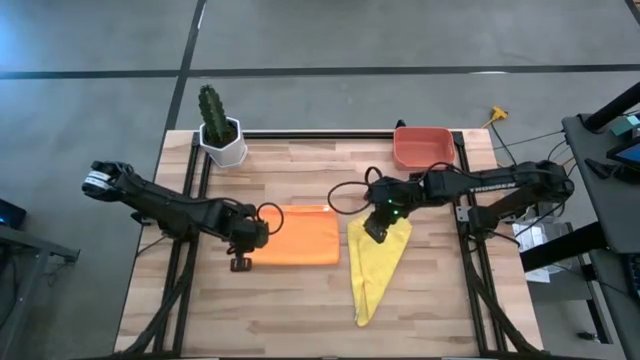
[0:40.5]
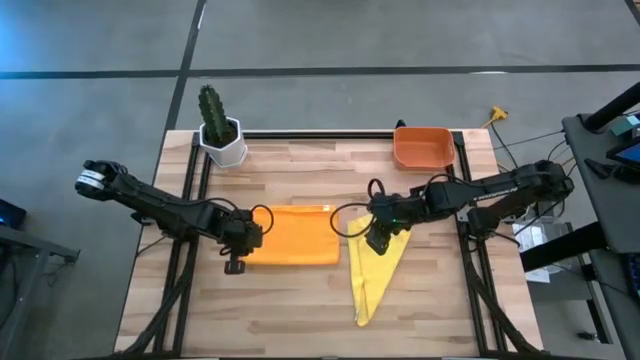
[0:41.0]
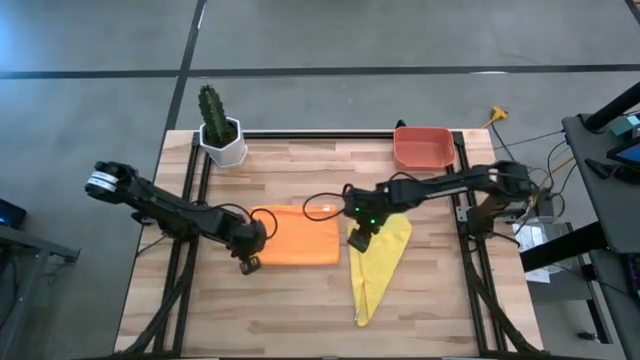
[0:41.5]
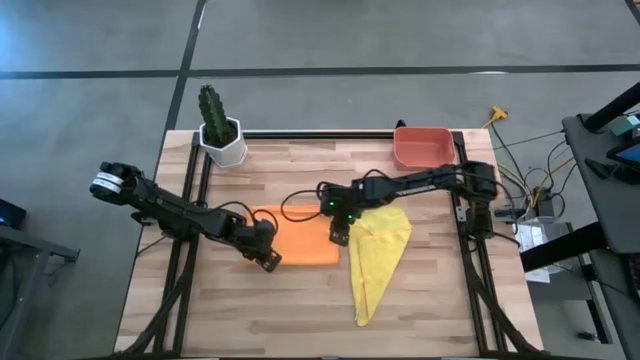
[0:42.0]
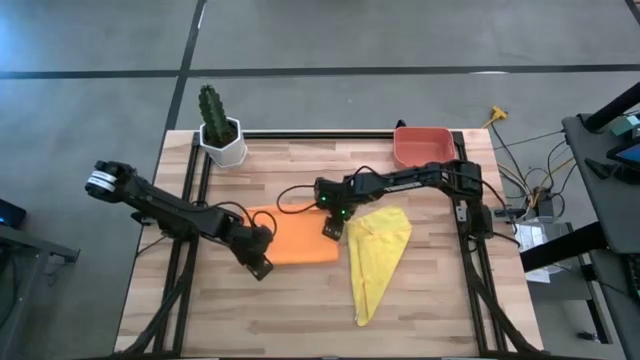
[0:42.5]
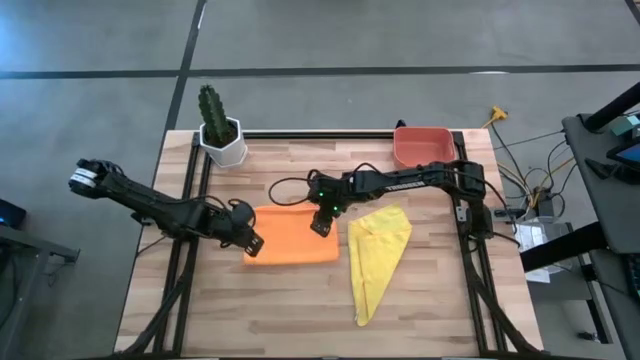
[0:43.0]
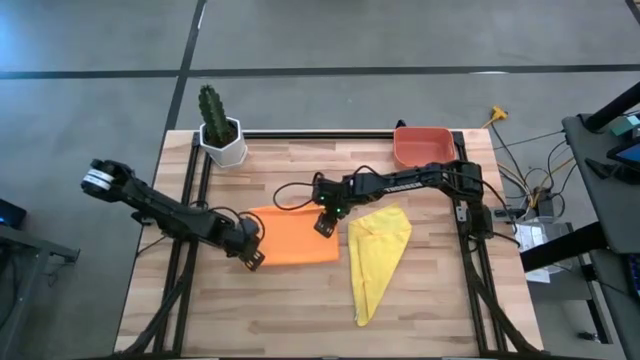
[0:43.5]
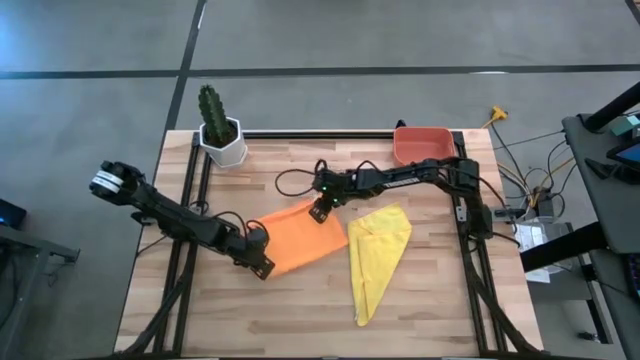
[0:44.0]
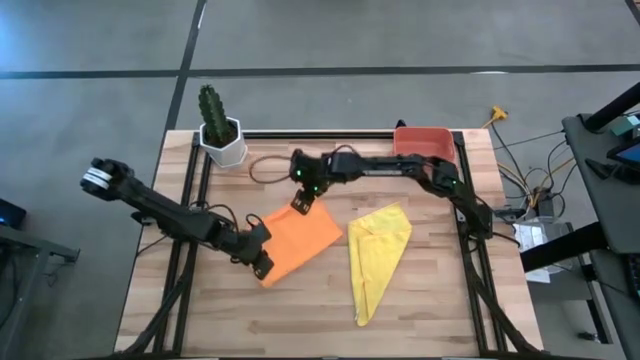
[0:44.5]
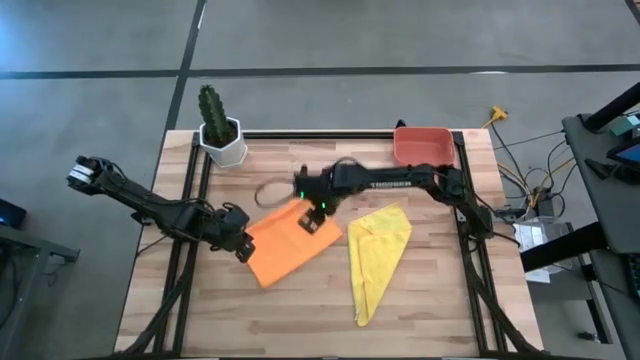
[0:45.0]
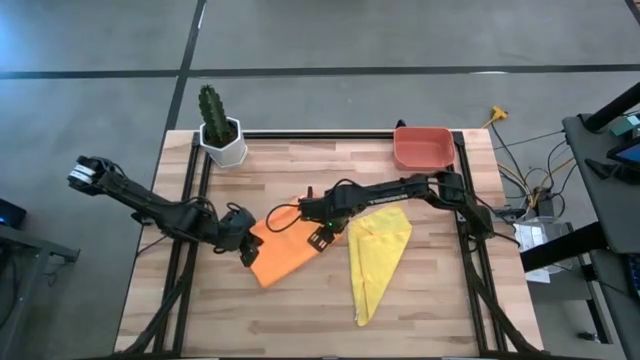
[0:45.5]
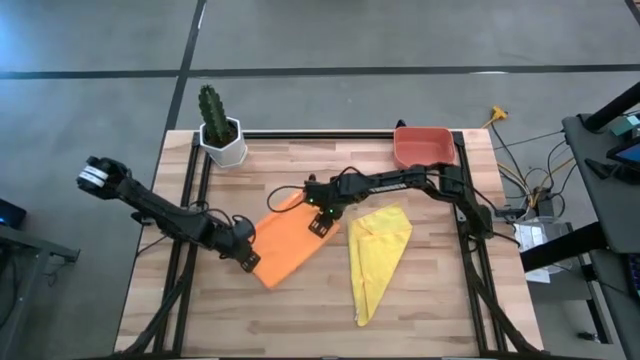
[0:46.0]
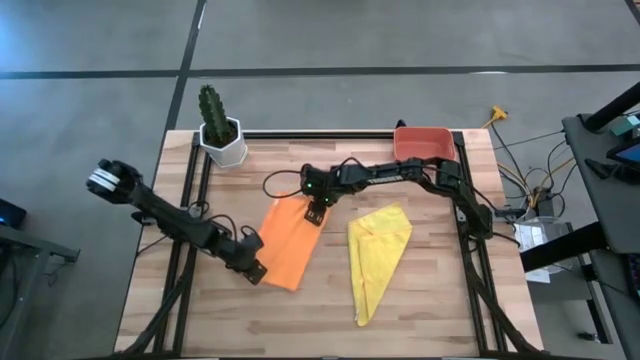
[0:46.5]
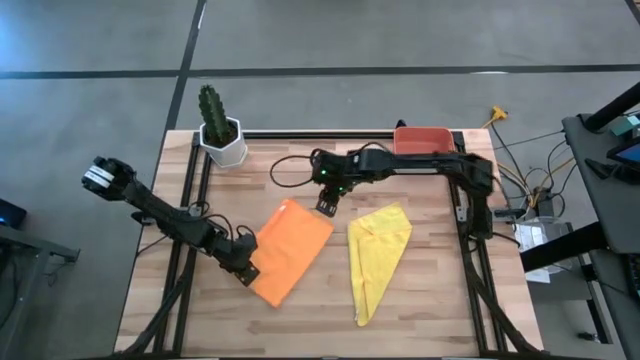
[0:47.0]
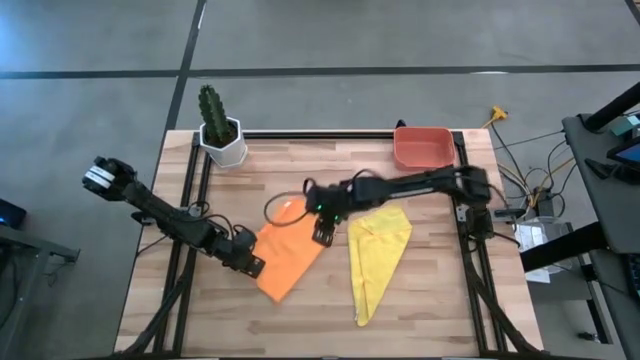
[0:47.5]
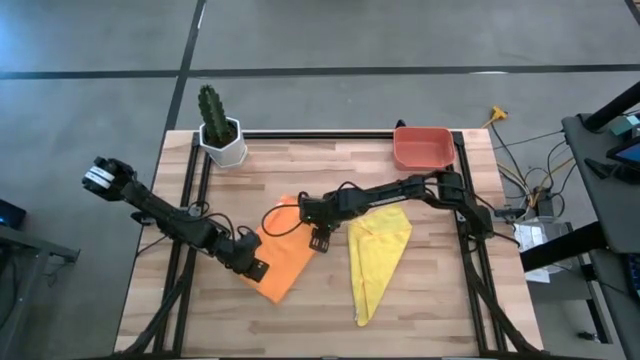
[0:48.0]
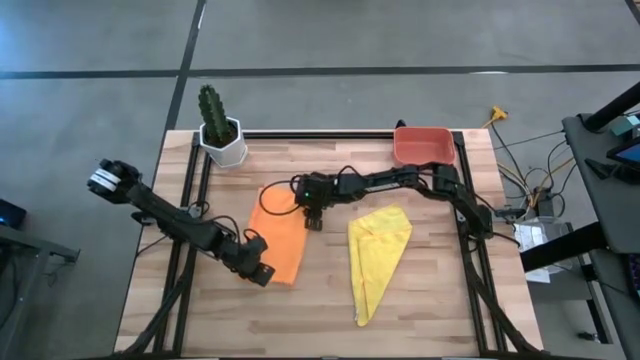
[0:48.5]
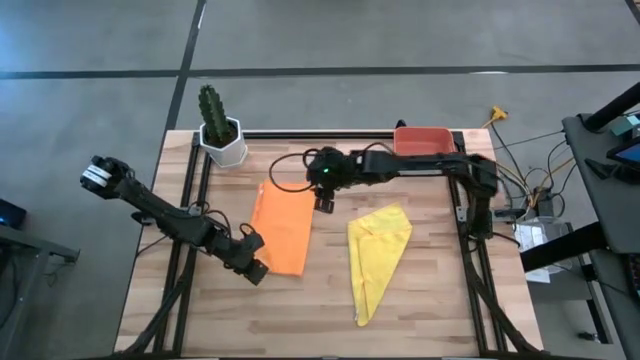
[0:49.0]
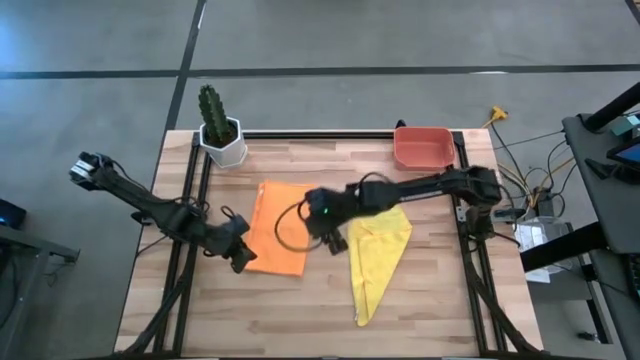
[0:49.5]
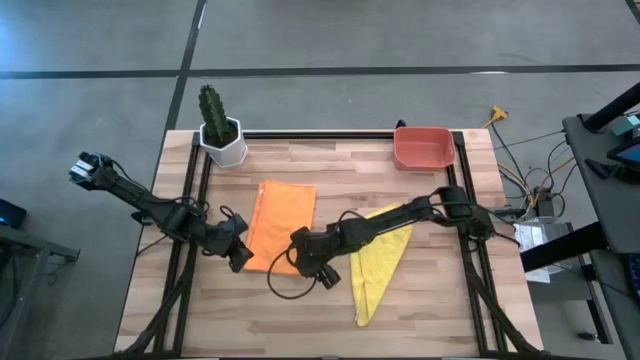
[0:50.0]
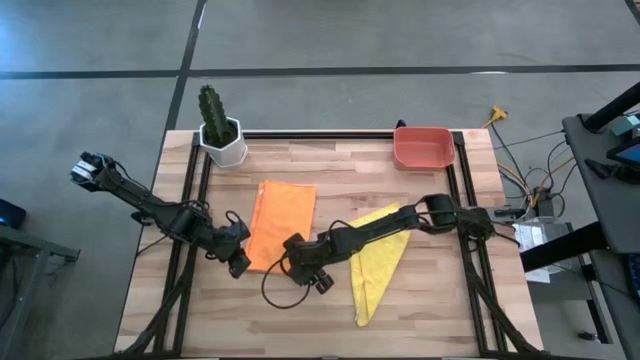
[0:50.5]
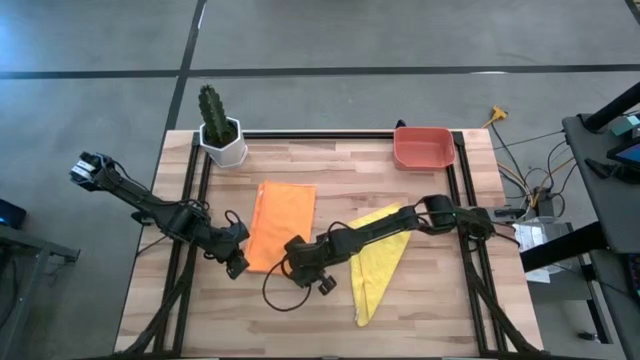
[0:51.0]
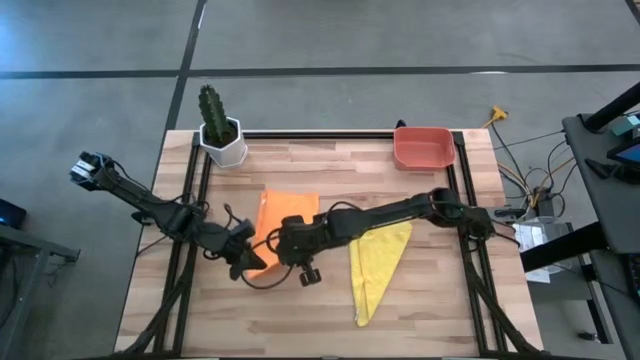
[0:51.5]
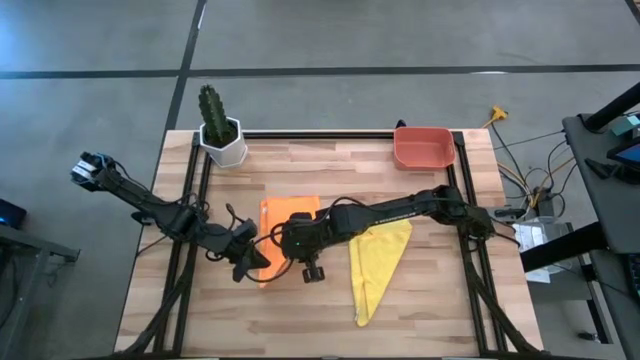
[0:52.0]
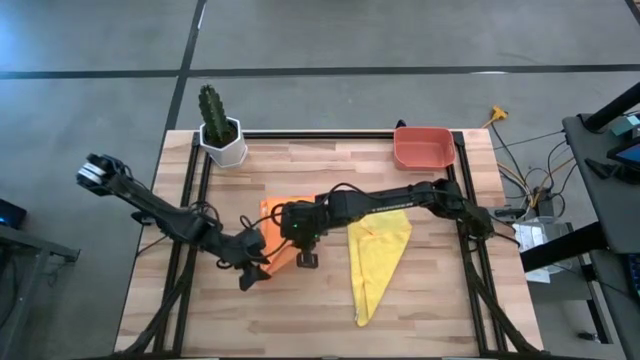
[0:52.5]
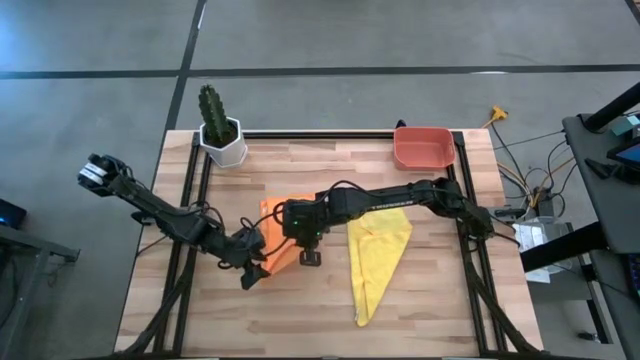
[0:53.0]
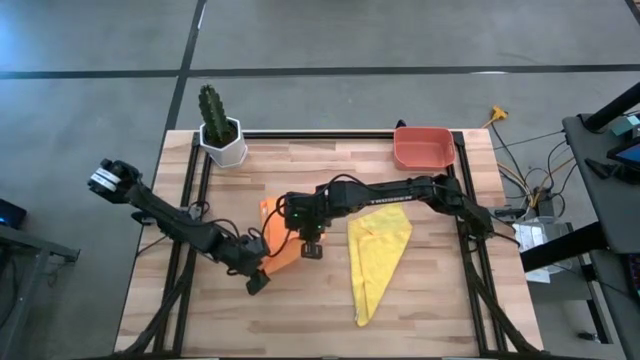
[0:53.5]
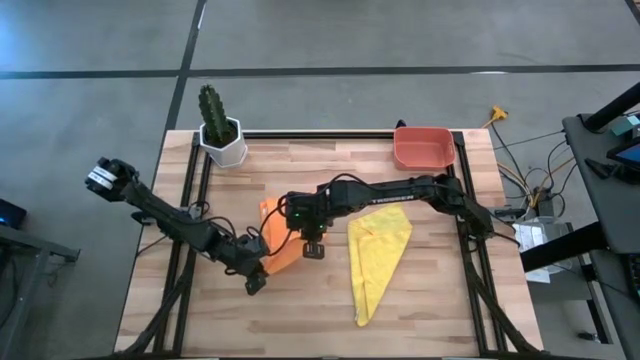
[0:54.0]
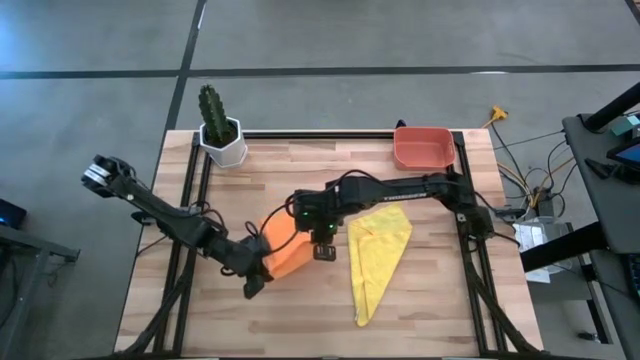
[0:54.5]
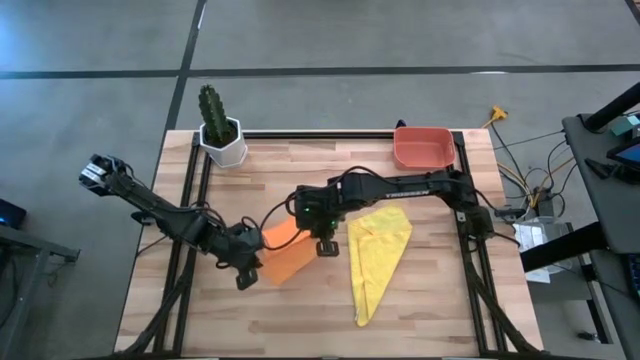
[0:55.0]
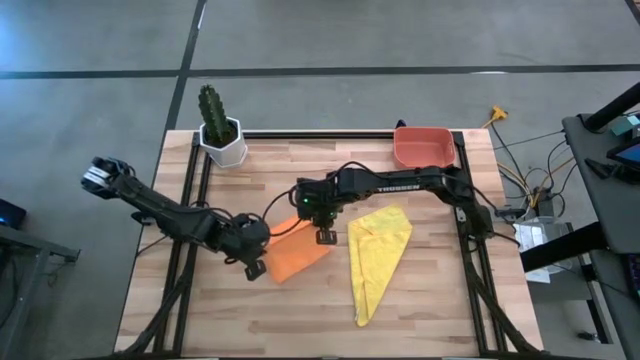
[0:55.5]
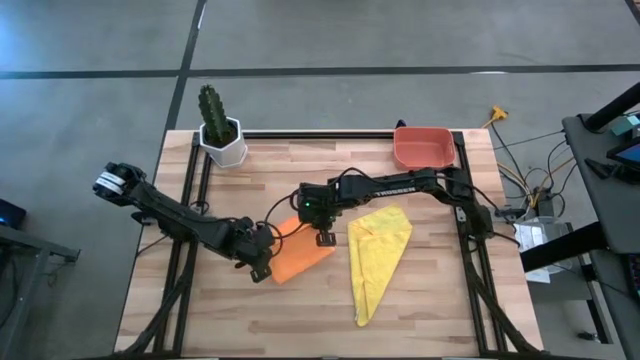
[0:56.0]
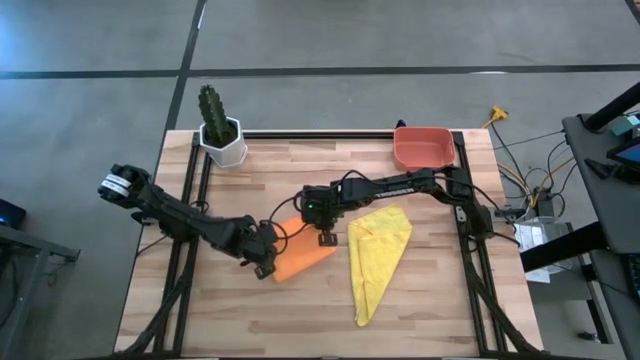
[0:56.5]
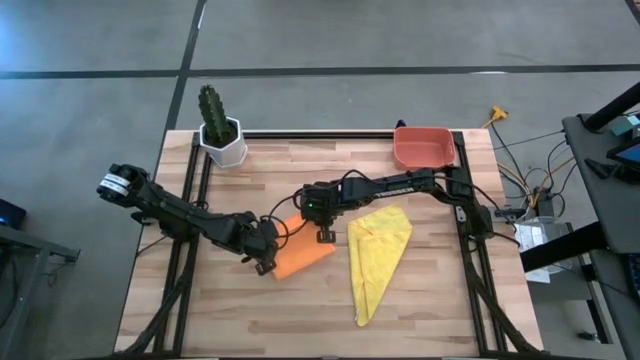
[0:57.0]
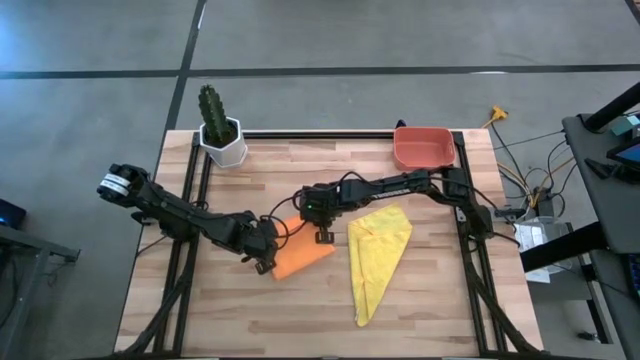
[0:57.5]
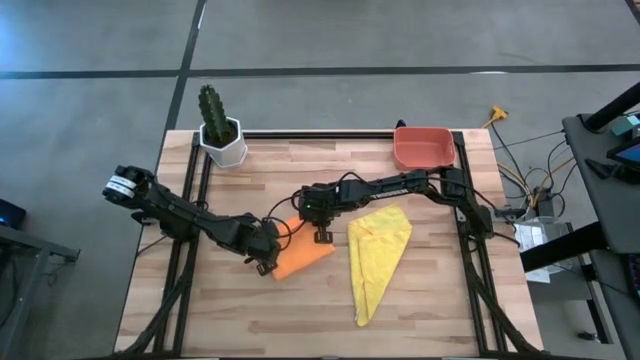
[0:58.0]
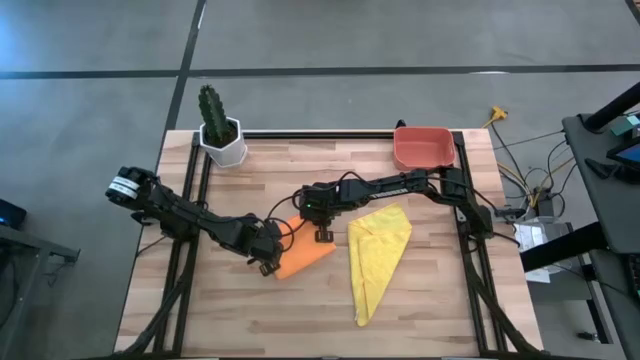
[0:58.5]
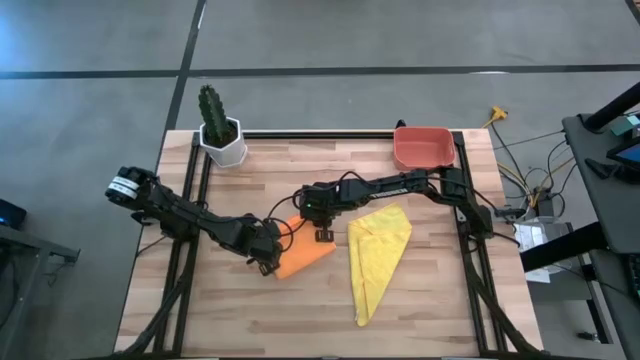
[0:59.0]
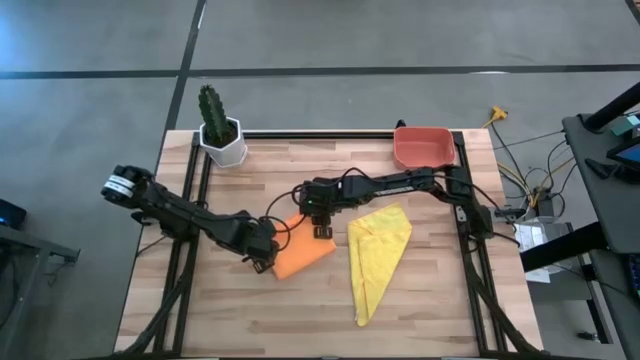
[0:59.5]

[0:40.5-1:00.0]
Task: Roll microfiber towels into tight, uniform cylinder then place into a basket
Fold the orange towel
